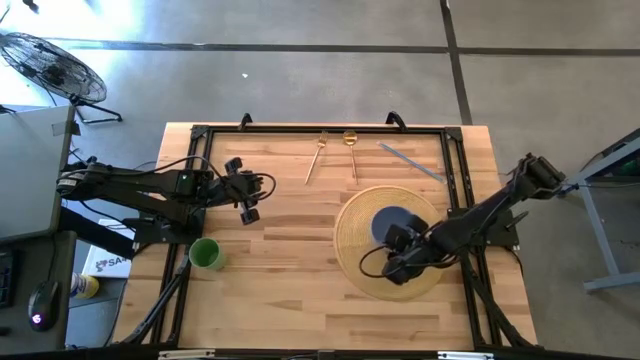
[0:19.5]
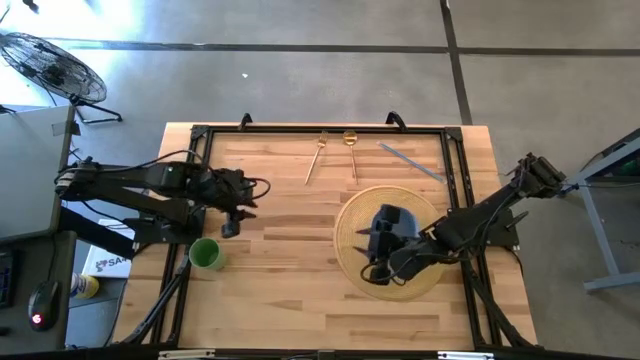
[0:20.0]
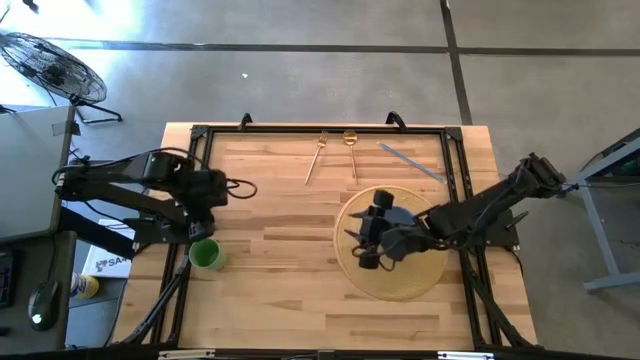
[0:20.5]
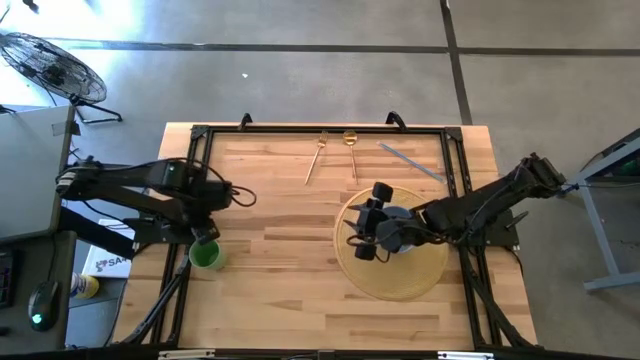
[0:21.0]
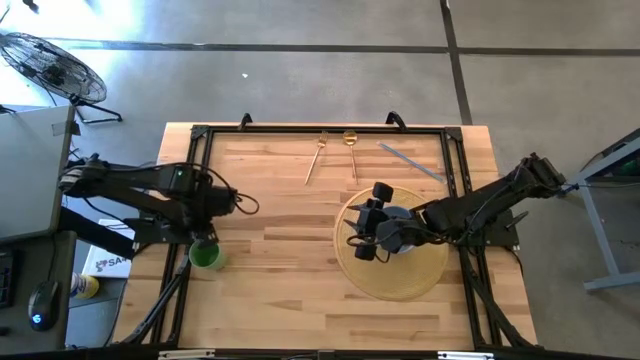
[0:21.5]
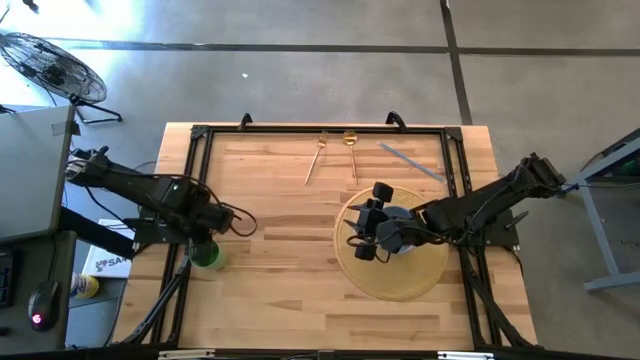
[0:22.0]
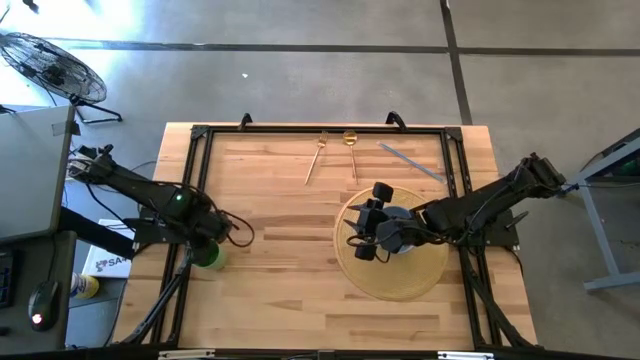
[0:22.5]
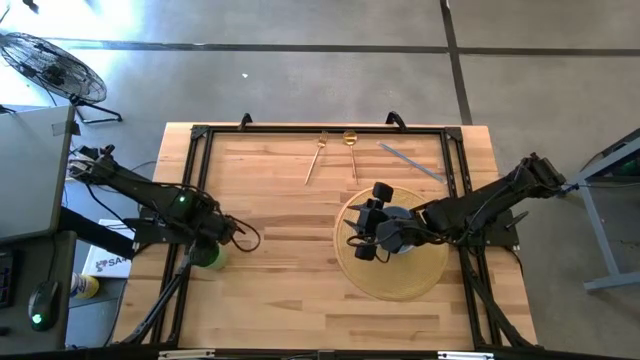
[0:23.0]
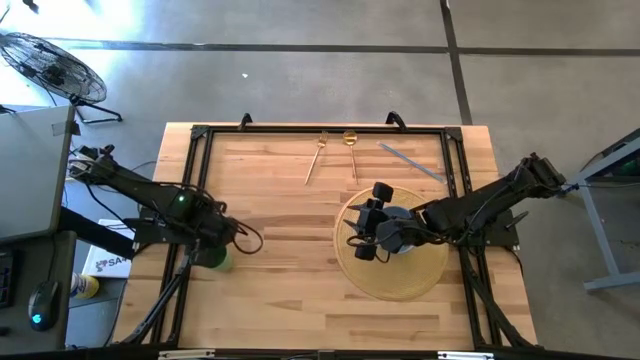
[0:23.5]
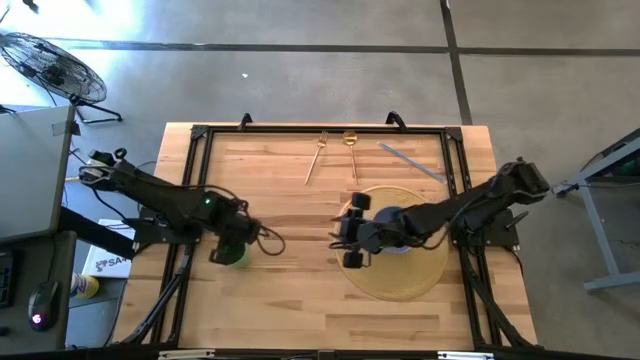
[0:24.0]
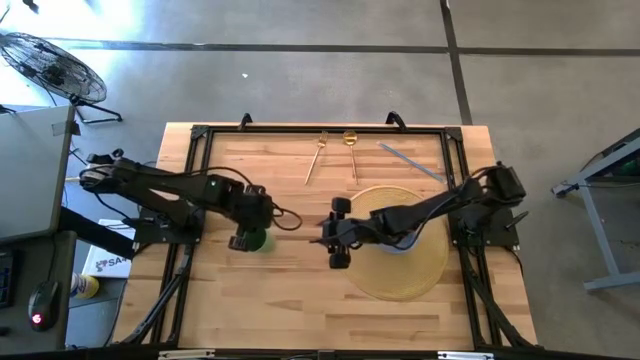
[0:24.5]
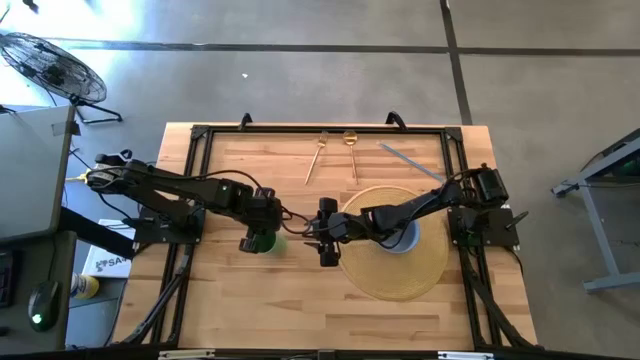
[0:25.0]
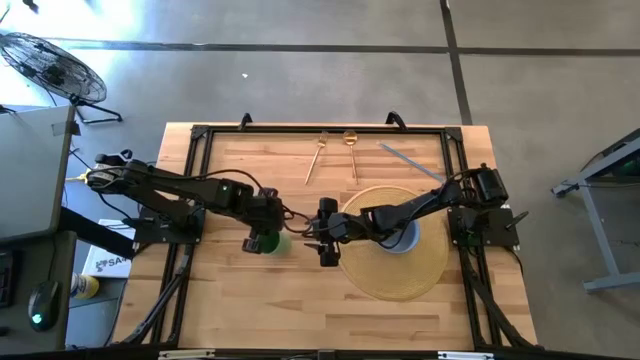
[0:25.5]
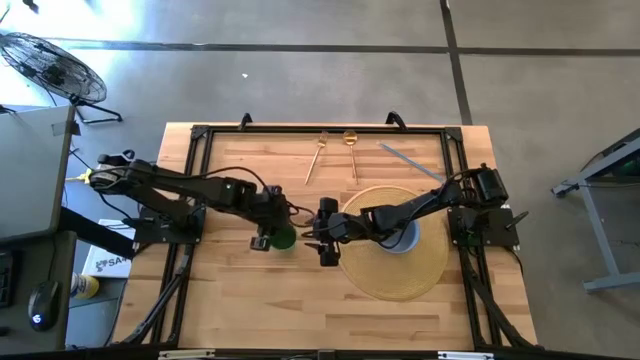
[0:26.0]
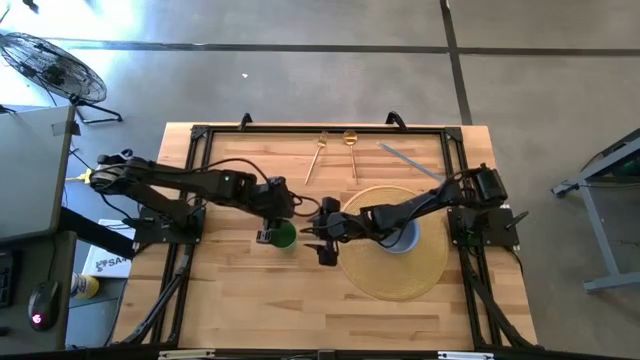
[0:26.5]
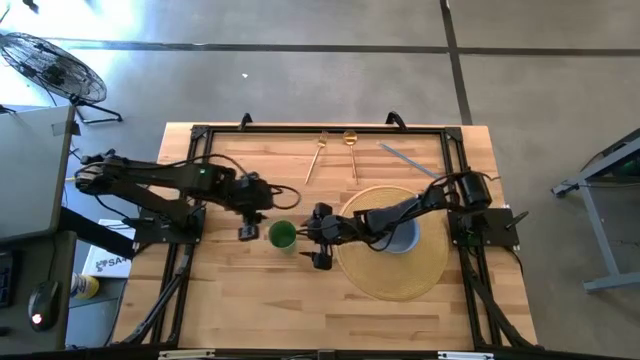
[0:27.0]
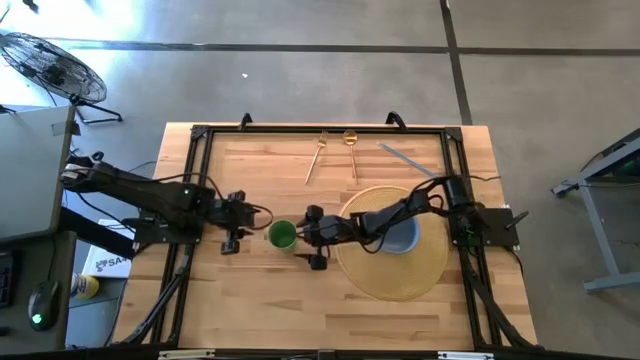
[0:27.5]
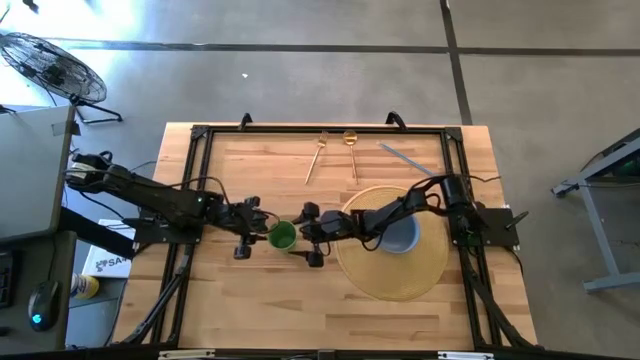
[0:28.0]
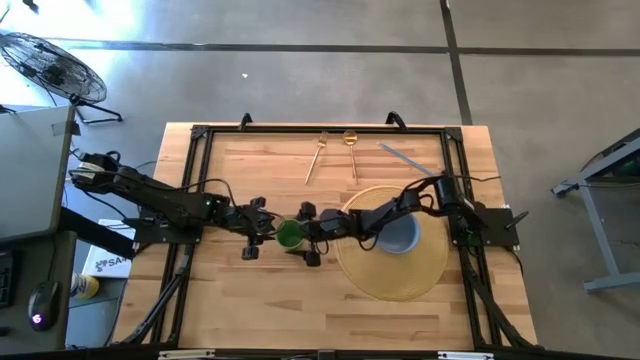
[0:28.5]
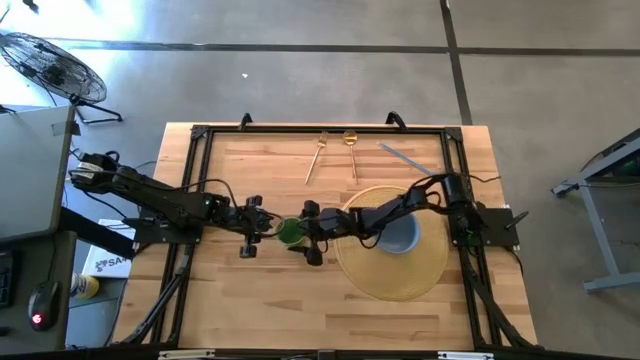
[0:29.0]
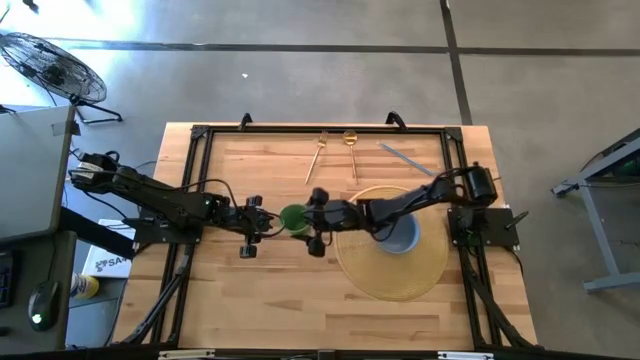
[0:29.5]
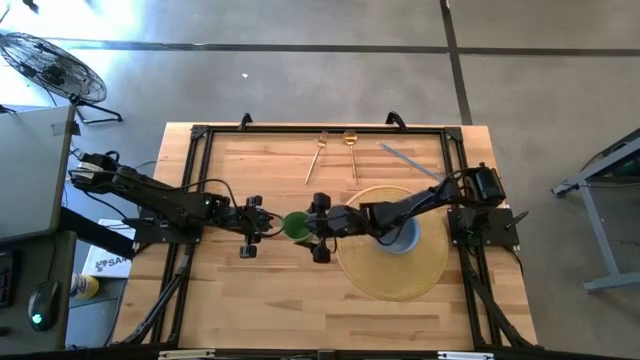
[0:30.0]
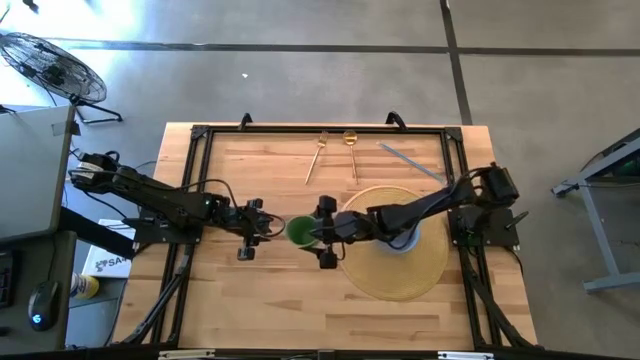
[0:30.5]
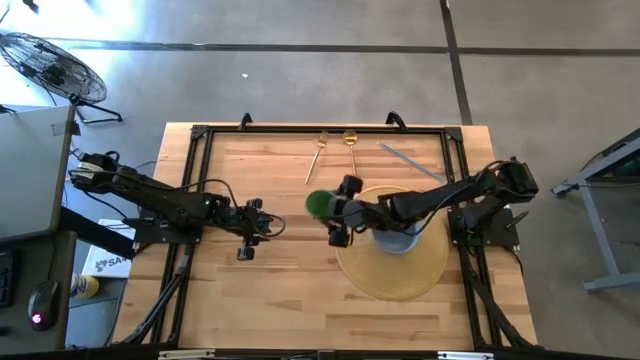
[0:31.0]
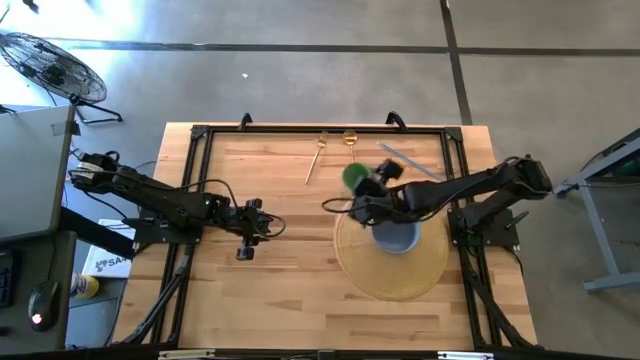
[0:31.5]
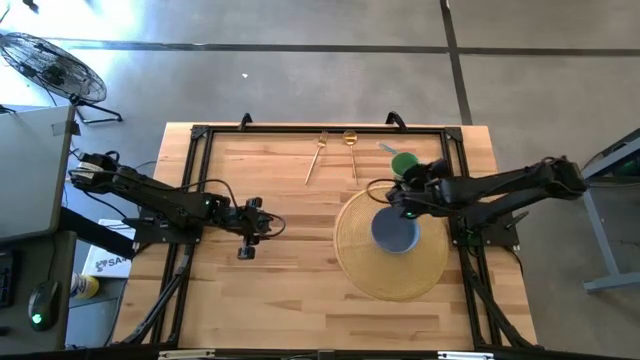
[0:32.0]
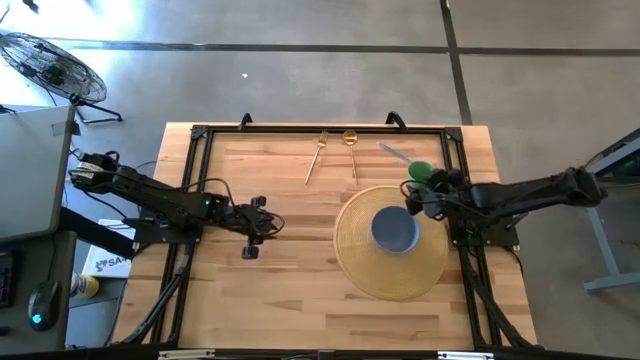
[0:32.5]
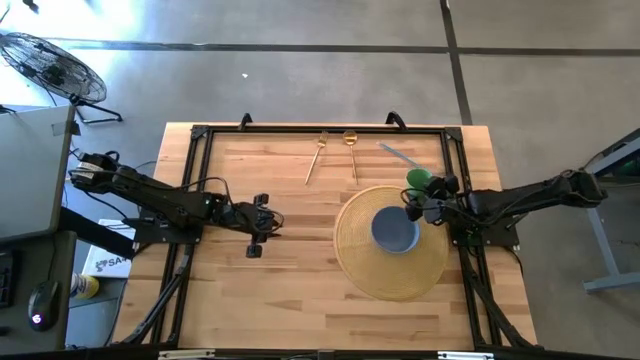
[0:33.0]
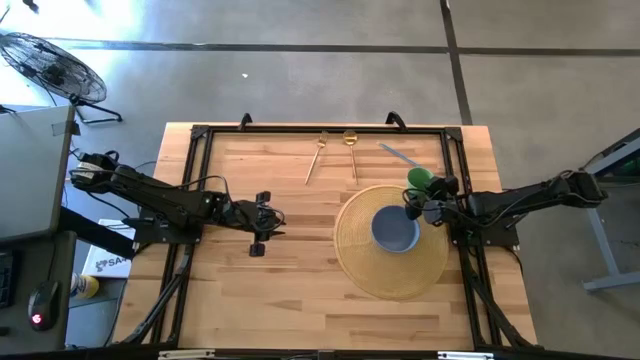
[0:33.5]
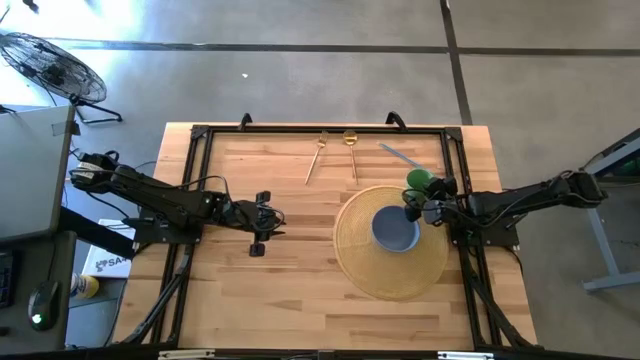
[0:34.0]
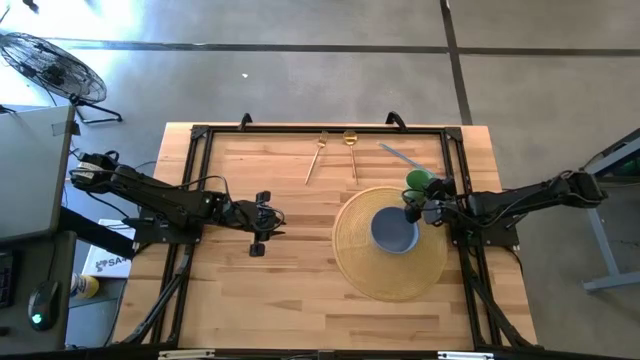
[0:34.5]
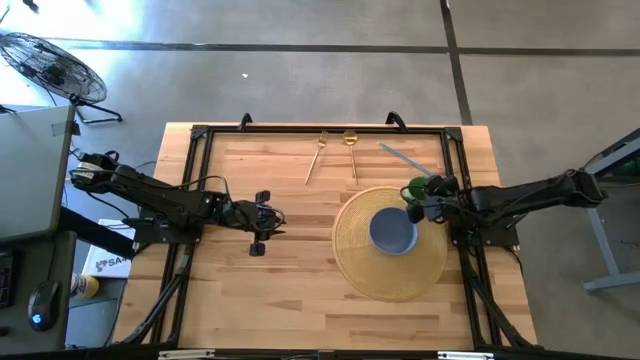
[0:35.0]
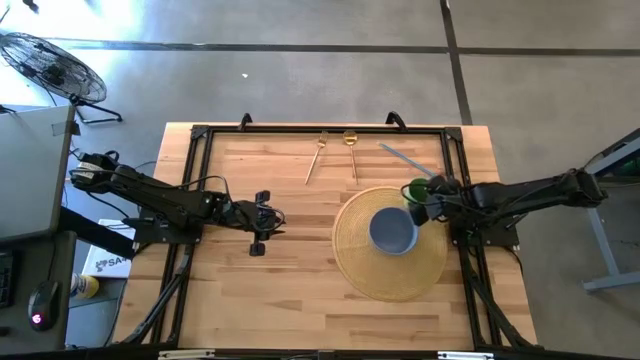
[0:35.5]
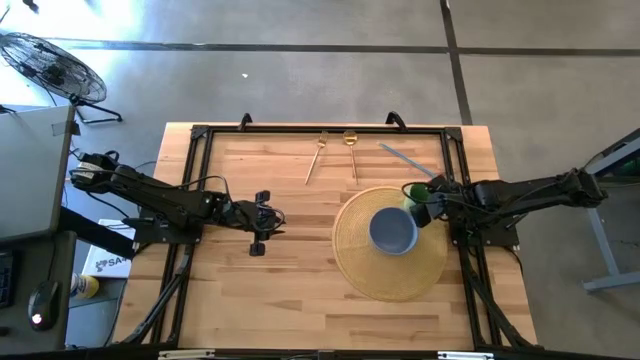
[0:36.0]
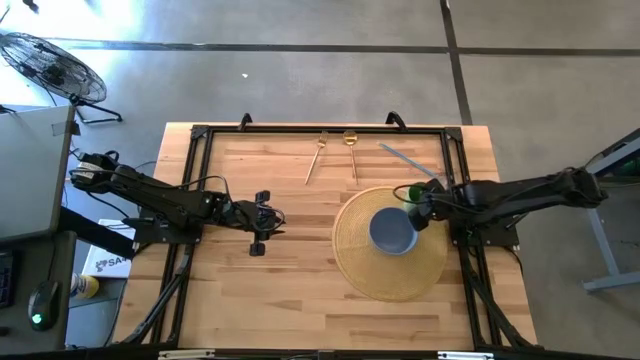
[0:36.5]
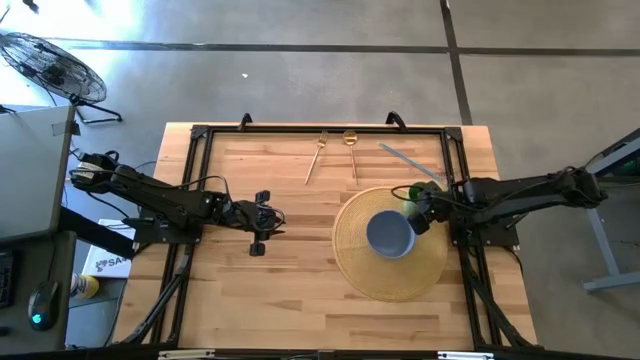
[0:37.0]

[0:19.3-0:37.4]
Task: Pick & Place Utensil
Put the green cup on the brown table mat to the top right of the blue bowl

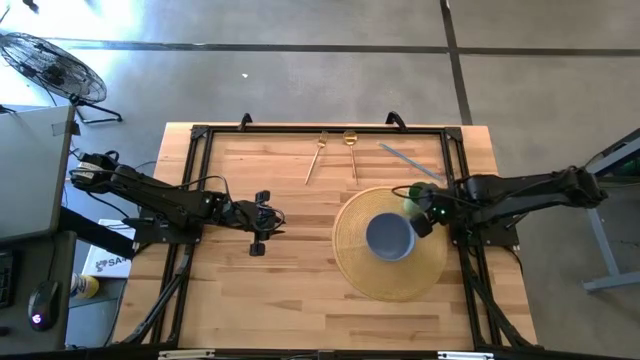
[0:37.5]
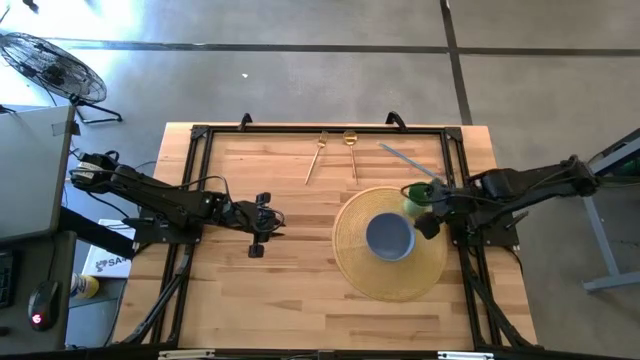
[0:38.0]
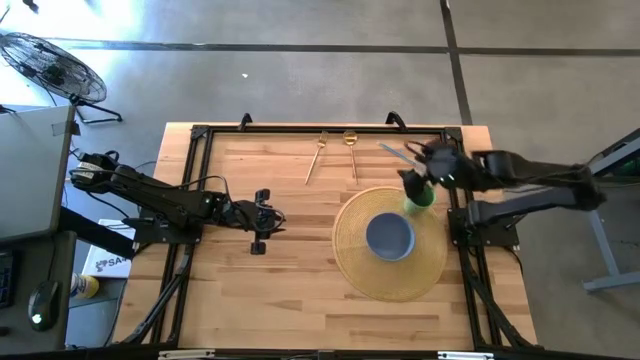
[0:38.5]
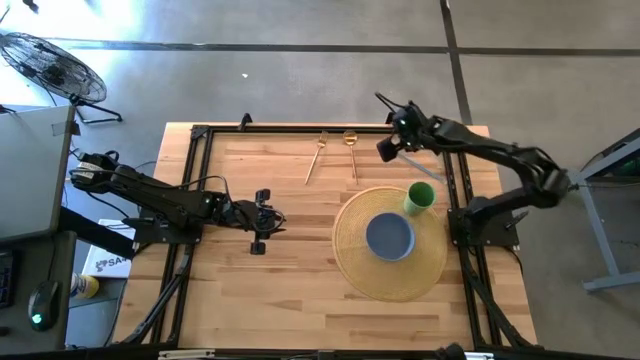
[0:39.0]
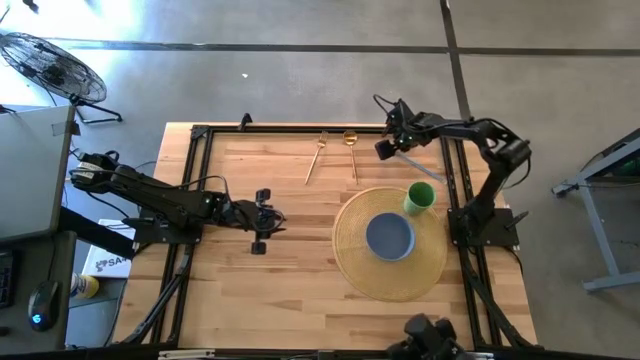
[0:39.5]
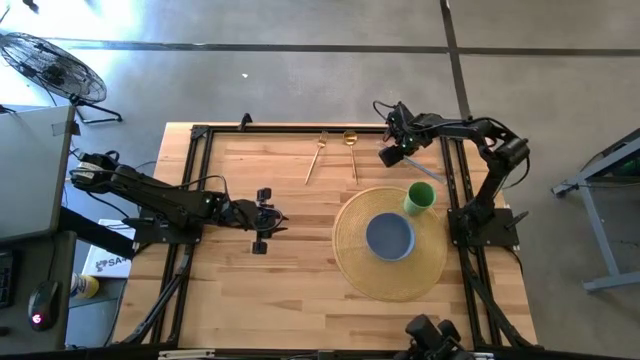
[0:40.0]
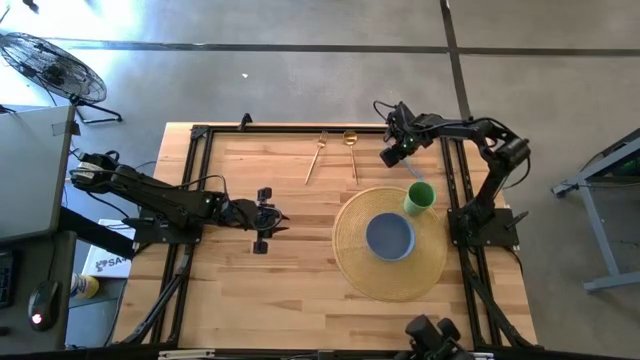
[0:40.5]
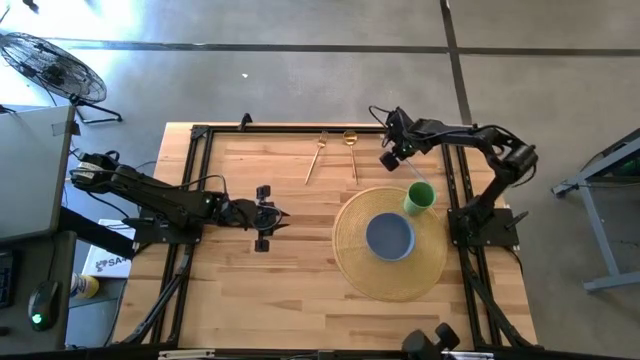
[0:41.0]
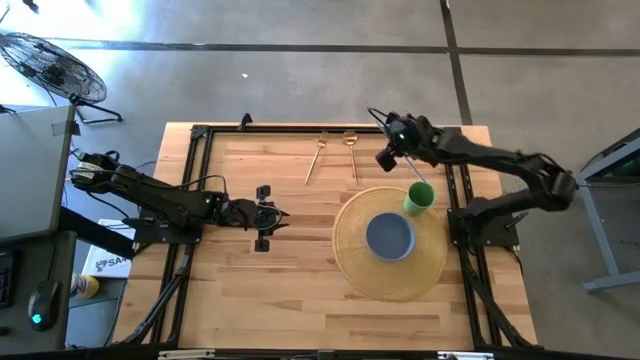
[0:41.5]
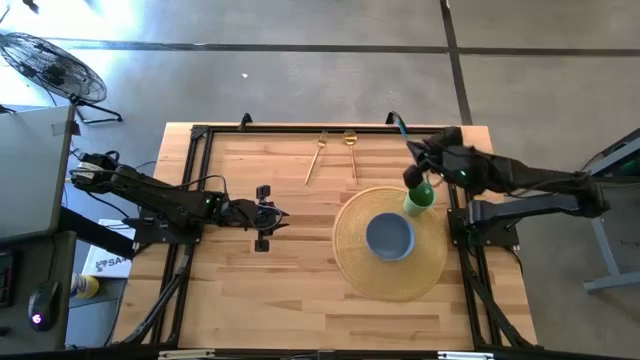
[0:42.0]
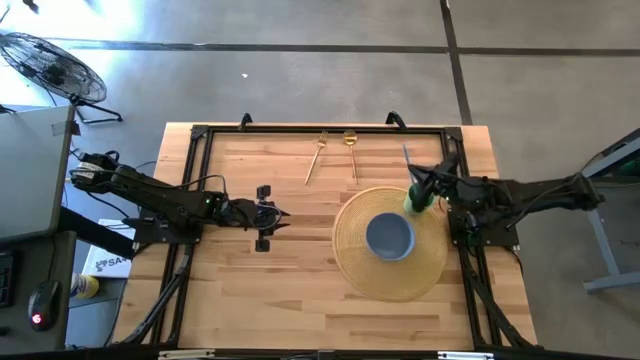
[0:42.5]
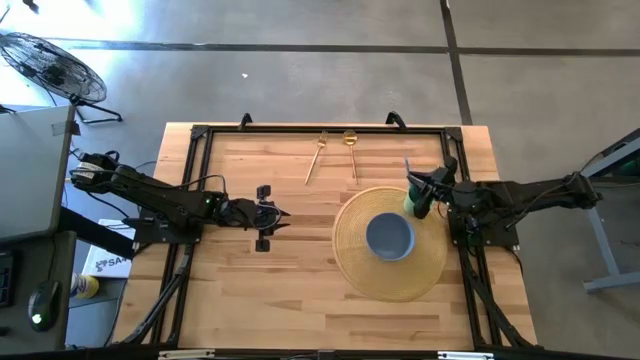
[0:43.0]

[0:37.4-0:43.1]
Put the blue straw into the green cup
